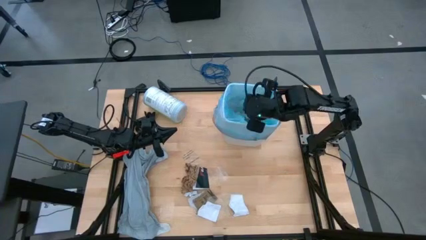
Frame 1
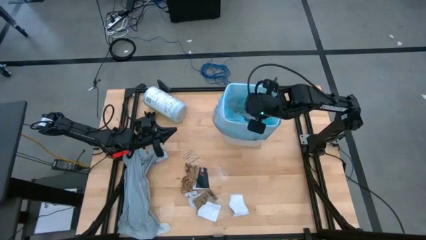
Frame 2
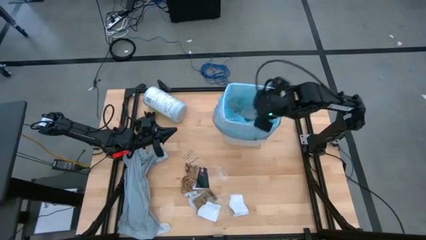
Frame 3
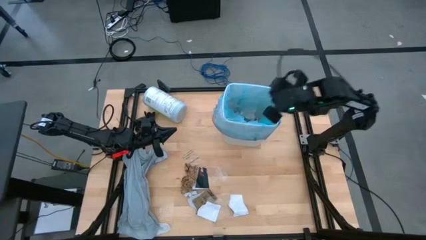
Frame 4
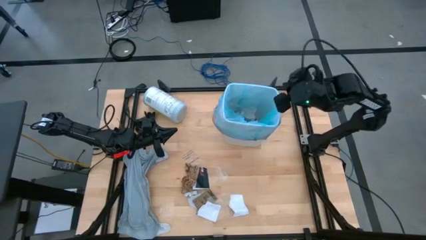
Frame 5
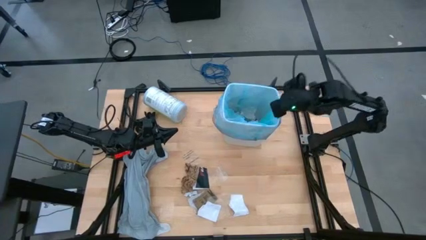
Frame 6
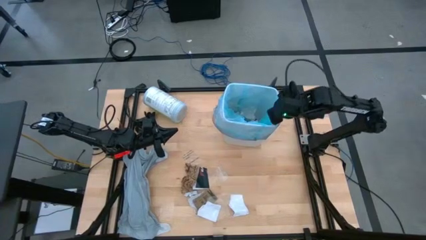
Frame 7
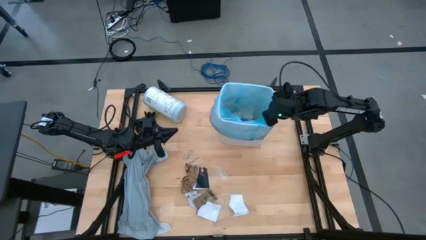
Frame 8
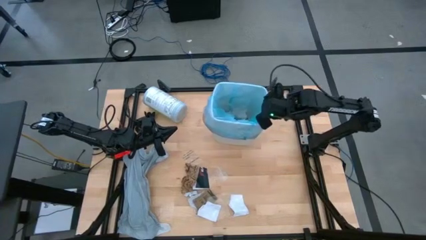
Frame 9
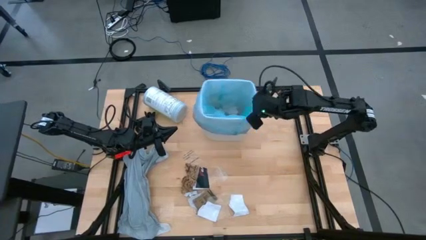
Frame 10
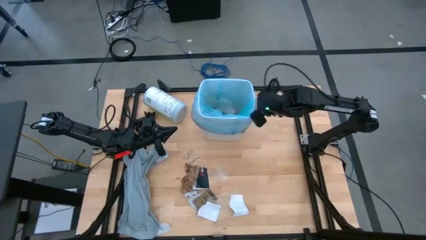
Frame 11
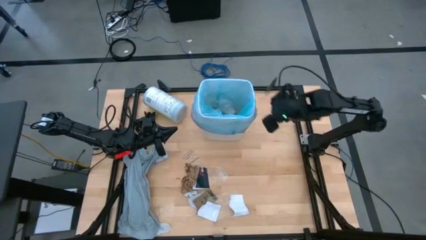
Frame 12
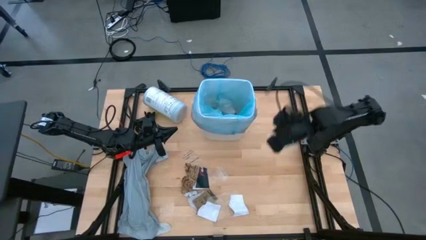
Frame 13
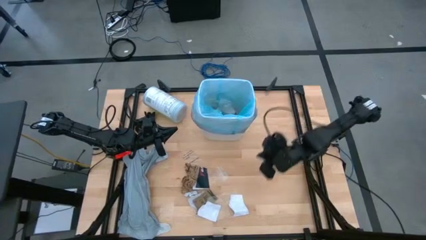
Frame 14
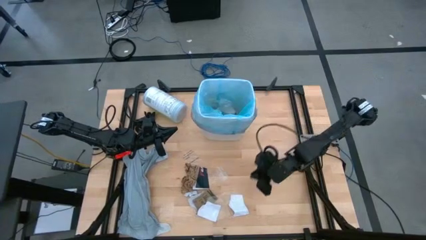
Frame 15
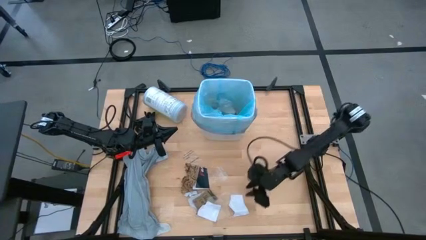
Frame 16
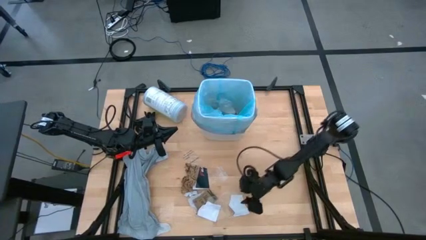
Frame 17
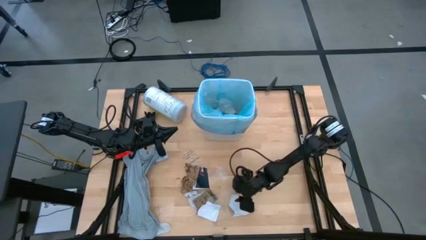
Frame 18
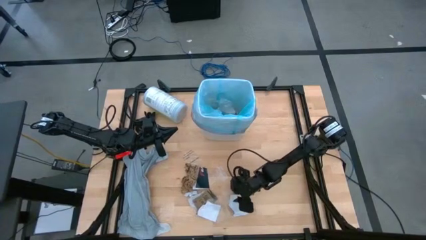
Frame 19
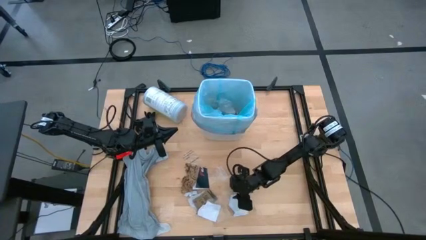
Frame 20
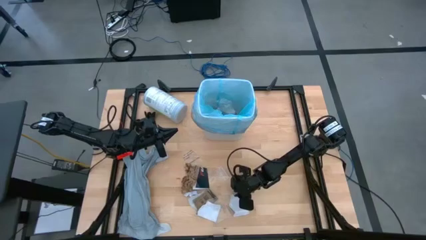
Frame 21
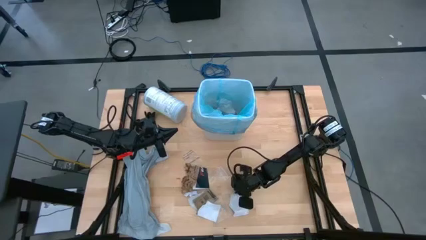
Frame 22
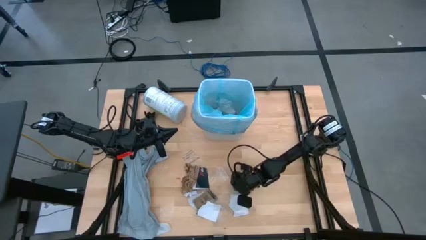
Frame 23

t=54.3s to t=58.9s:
Task: place trash/remove bag and relplace
Put the transparent plastic into the trash bin

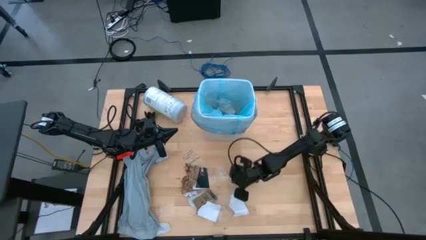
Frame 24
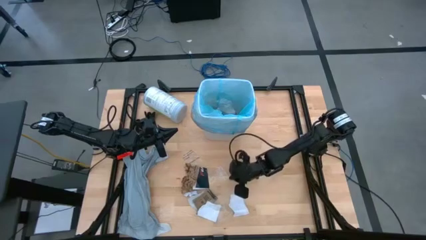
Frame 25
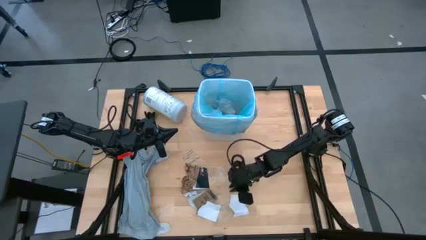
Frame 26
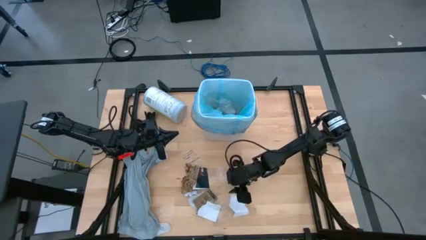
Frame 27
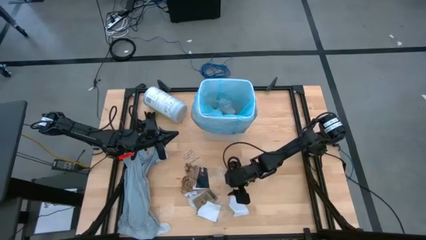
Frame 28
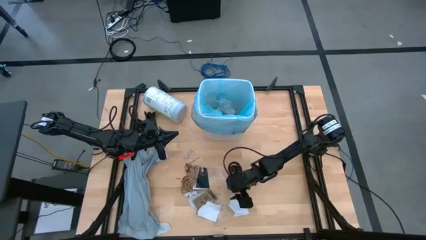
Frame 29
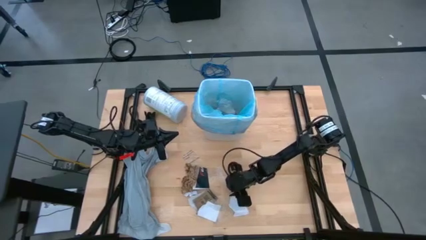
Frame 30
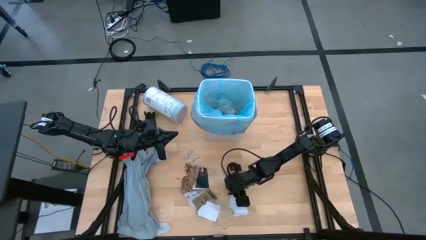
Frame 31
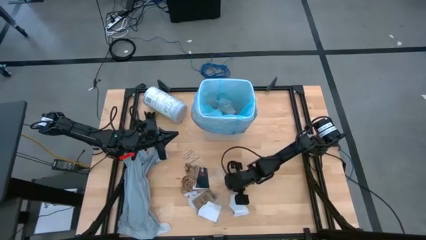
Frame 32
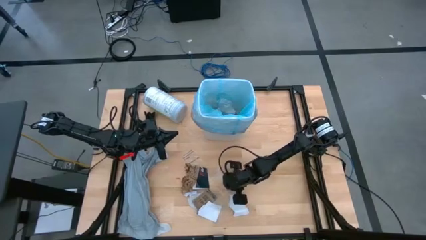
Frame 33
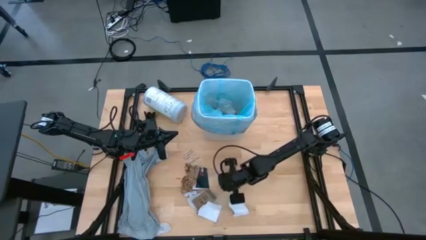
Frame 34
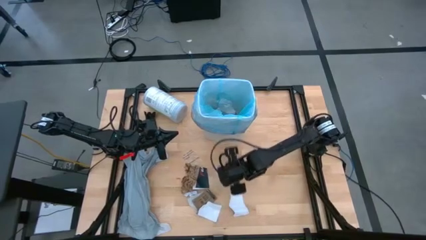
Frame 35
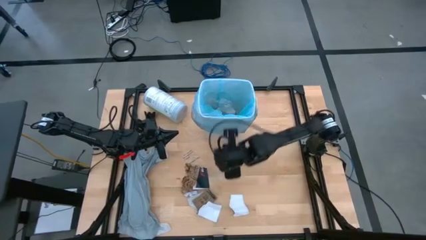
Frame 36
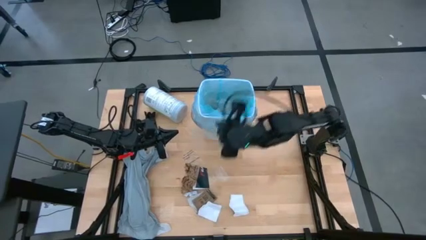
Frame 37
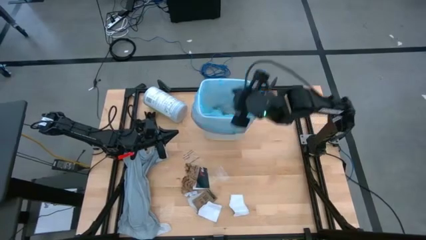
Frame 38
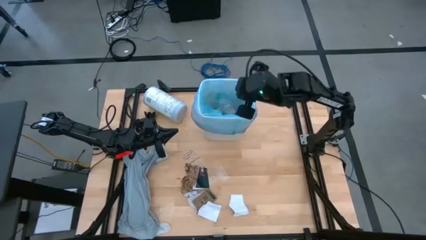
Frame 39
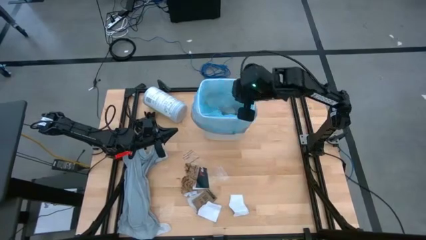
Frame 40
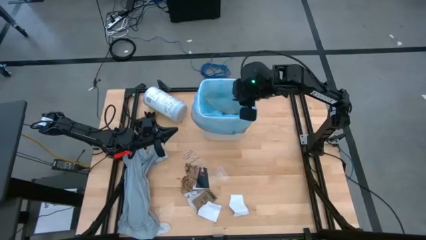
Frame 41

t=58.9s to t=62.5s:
Put the transparent plastic into the trash bin

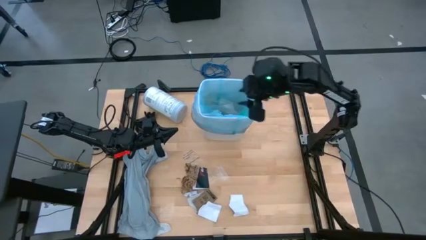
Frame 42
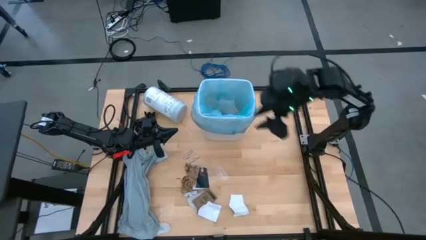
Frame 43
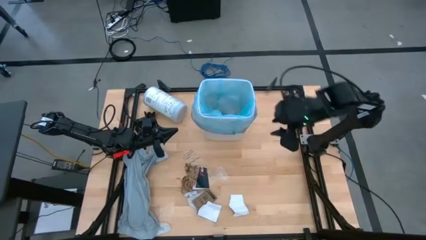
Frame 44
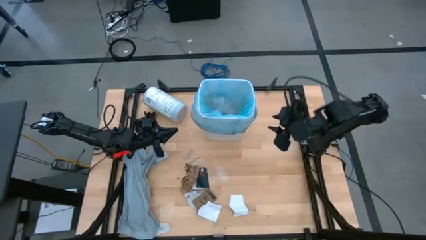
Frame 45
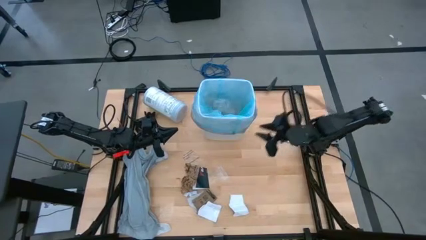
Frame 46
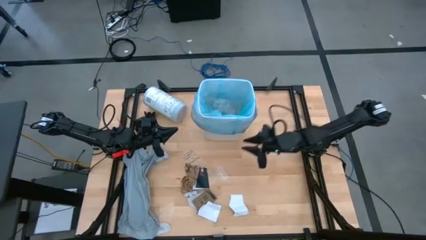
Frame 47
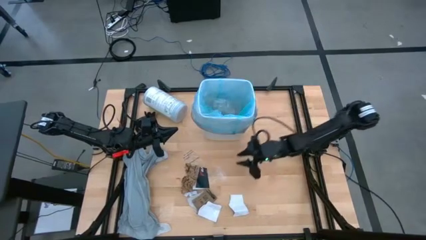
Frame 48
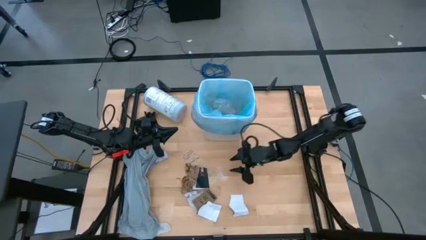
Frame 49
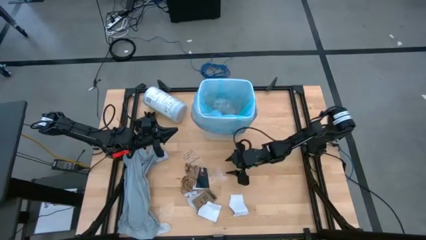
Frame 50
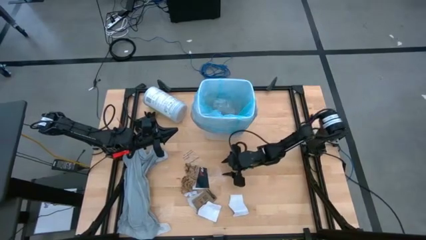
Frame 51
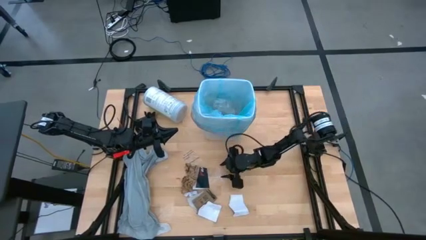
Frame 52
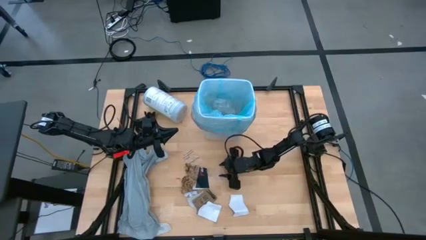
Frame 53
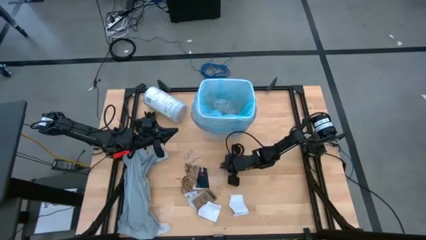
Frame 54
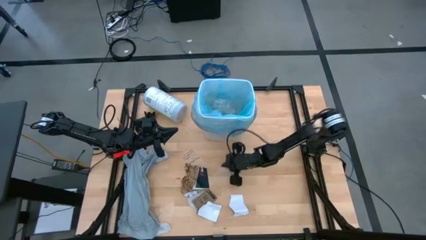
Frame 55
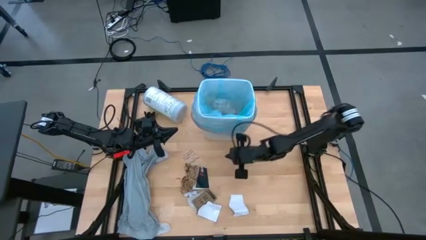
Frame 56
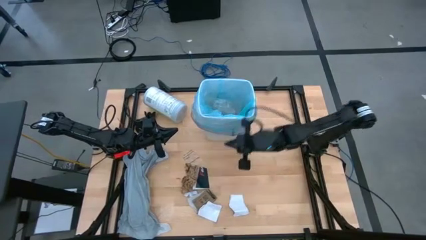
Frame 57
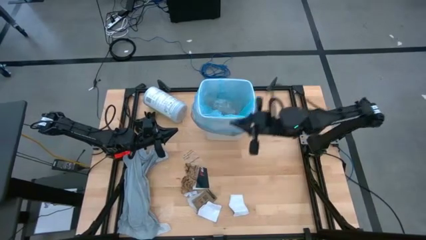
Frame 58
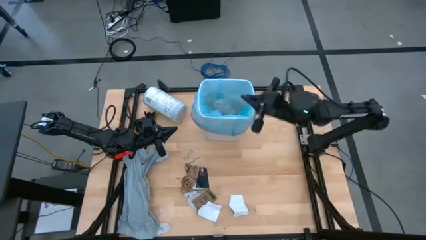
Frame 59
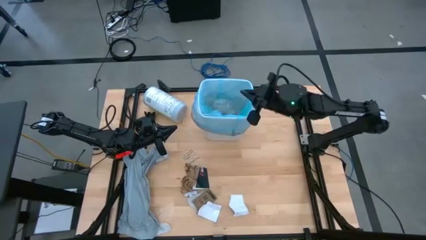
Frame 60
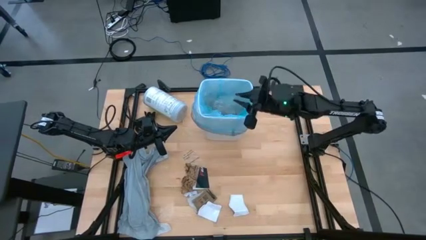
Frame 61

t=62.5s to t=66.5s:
Put the transparent plastic into the trash bin

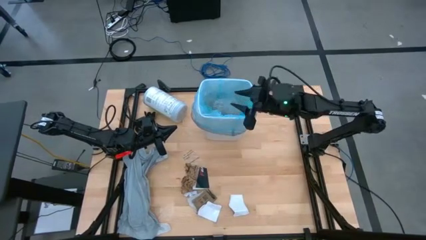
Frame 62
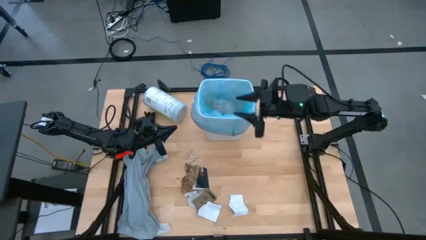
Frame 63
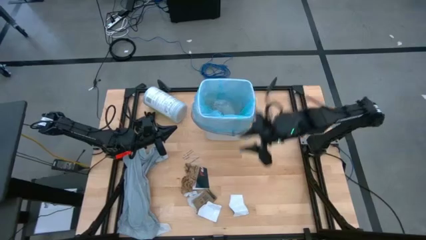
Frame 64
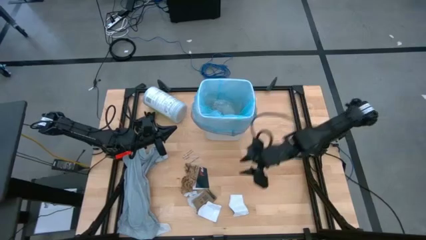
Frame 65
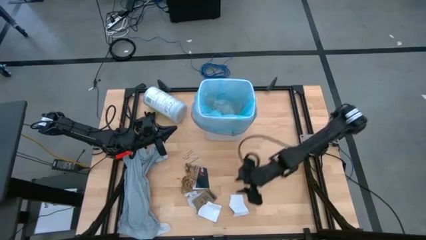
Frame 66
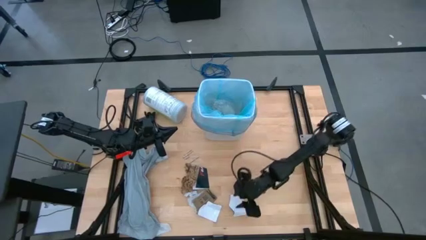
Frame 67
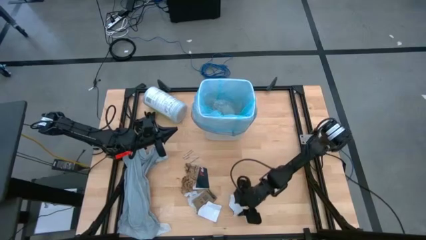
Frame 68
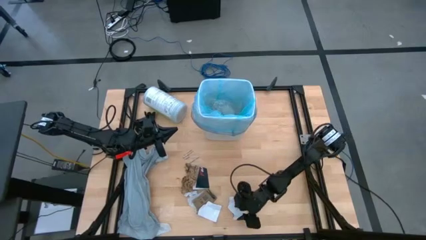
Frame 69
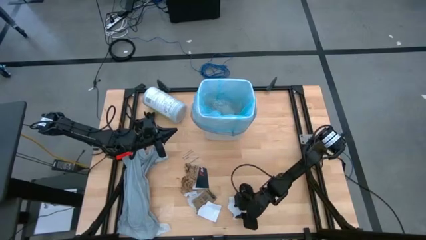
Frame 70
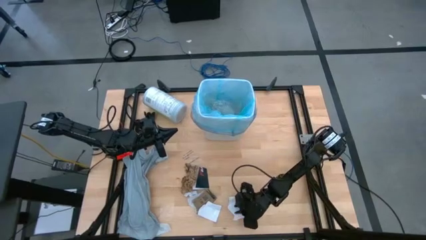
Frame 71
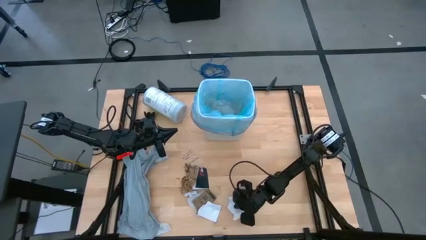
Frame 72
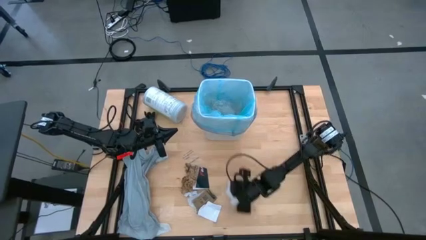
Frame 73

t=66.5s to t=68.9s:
Put the white paper into the trash bin

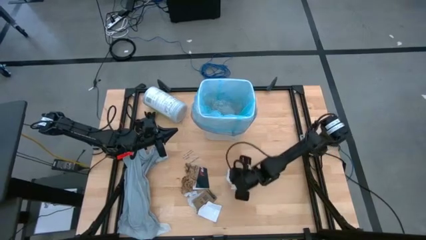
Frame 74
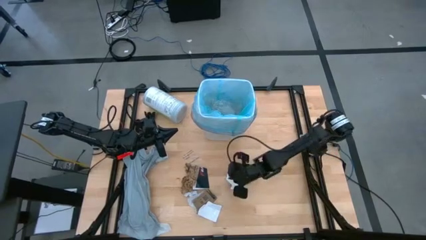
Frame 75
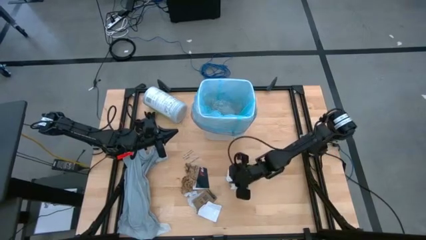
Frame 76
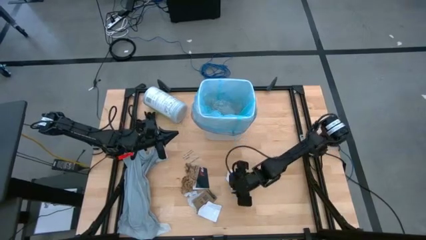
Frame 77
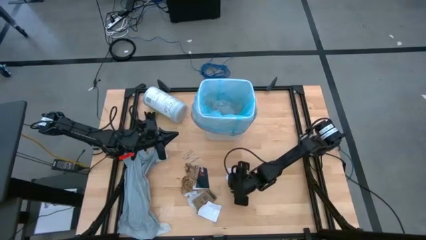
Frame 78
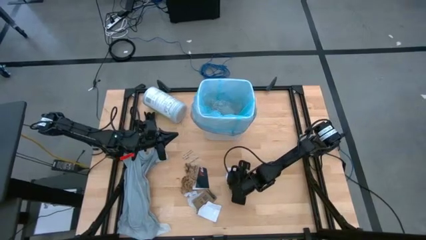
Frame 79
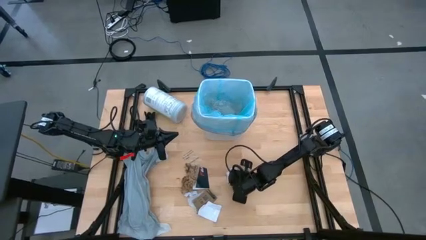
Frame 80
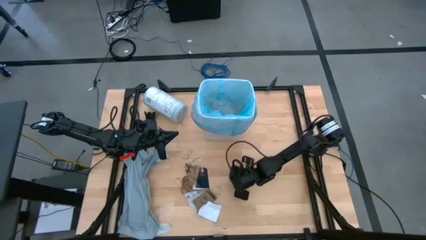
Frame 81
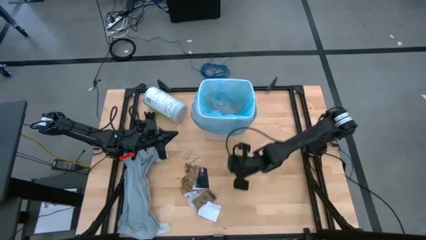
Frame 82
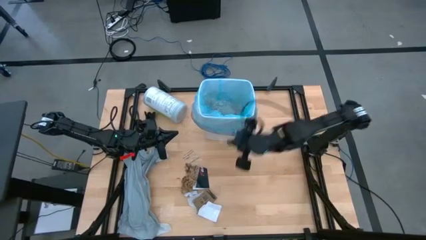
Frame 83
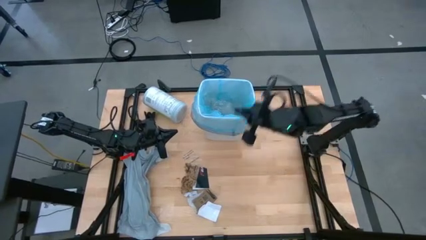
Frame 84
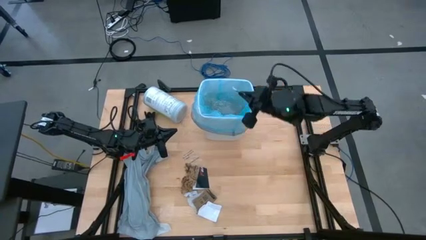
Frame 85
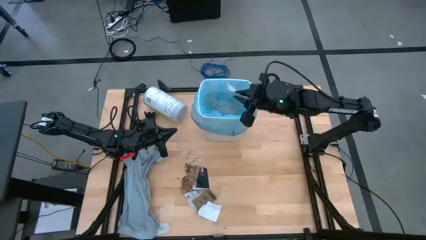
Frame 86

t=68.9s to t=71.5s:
Put the white paper into the trash bin
